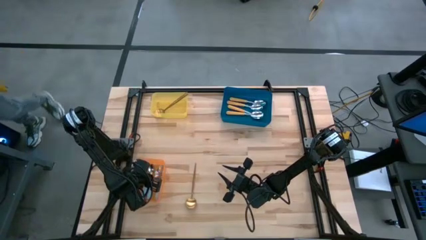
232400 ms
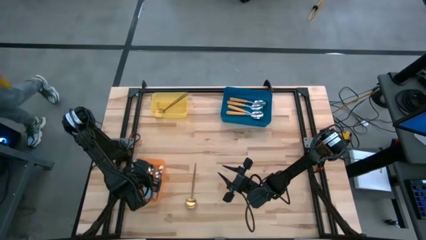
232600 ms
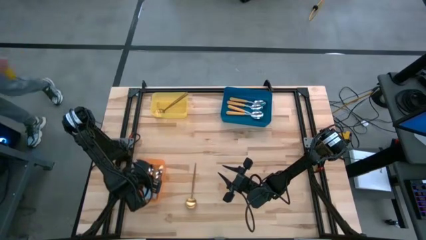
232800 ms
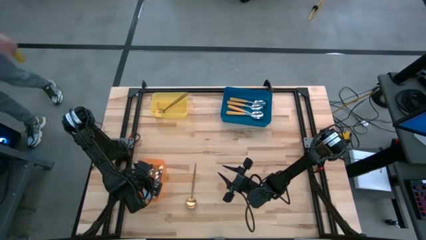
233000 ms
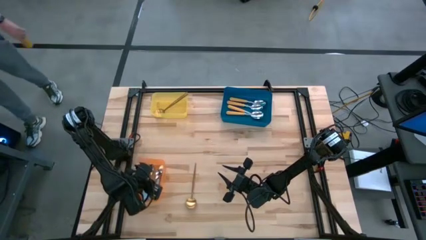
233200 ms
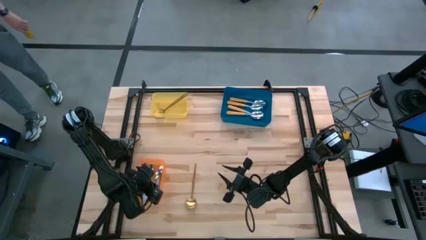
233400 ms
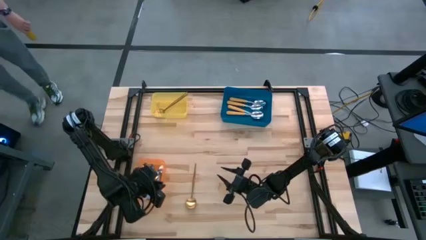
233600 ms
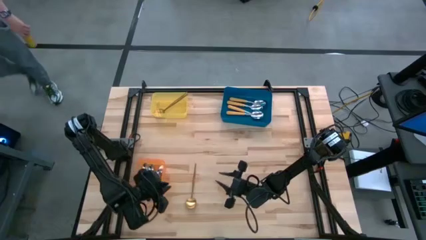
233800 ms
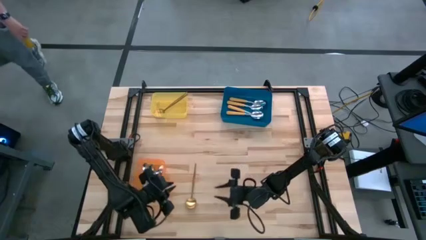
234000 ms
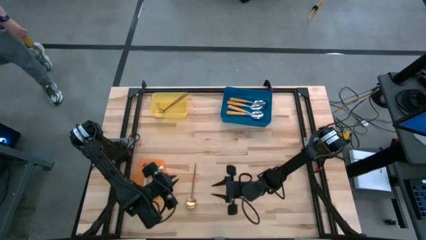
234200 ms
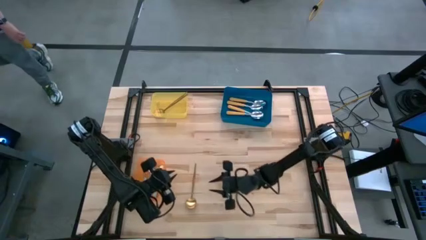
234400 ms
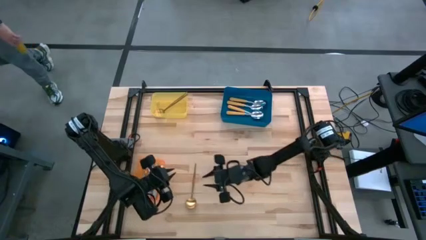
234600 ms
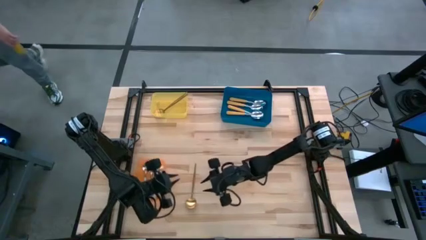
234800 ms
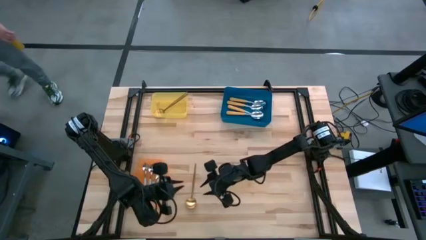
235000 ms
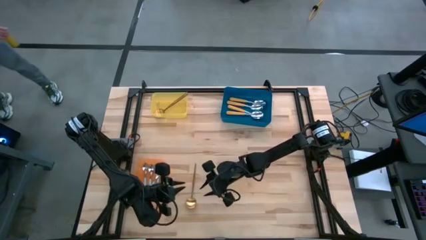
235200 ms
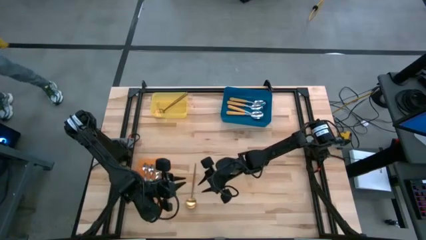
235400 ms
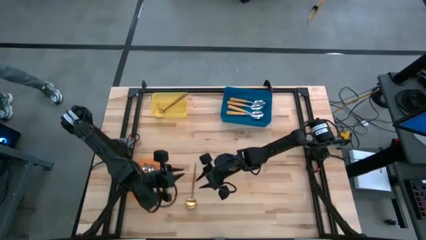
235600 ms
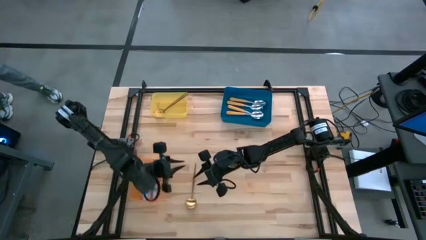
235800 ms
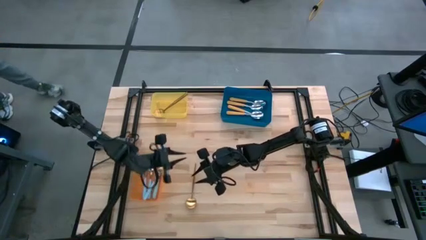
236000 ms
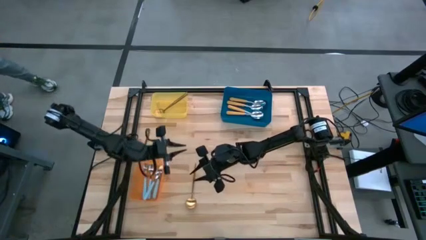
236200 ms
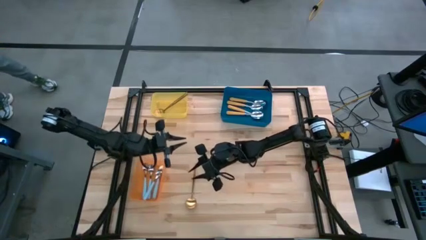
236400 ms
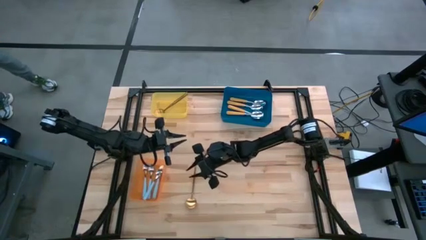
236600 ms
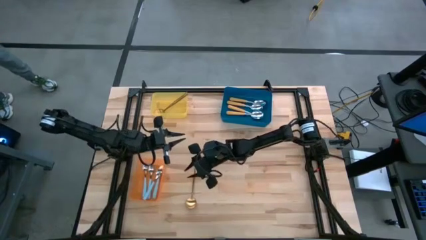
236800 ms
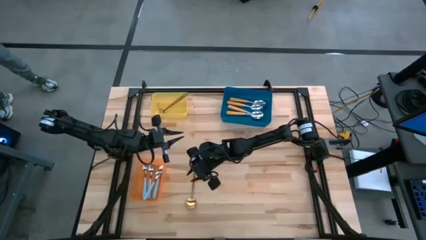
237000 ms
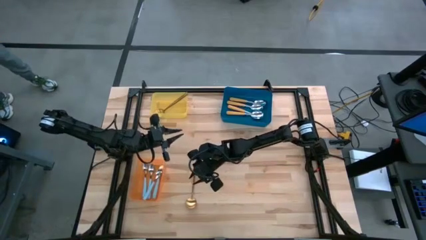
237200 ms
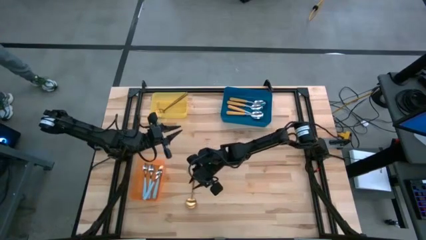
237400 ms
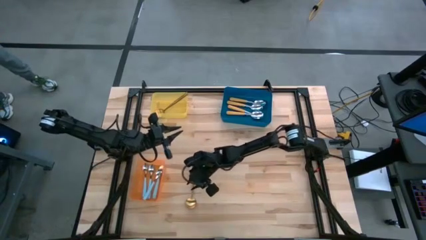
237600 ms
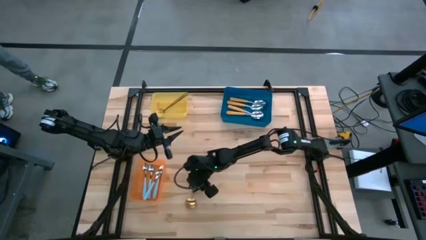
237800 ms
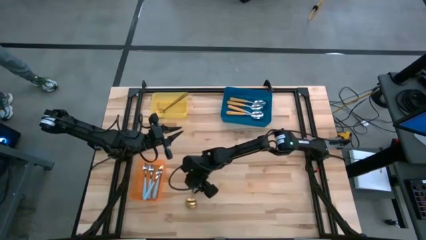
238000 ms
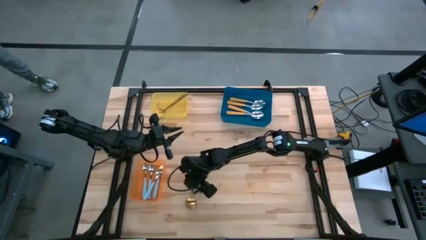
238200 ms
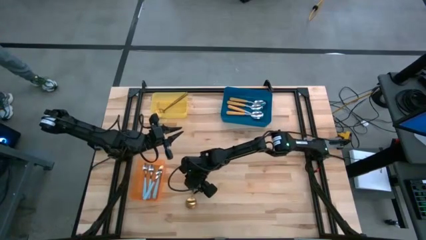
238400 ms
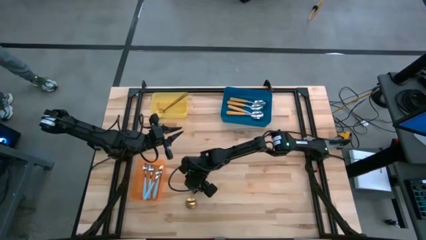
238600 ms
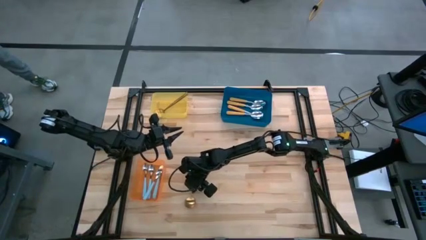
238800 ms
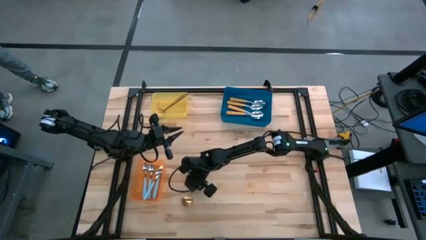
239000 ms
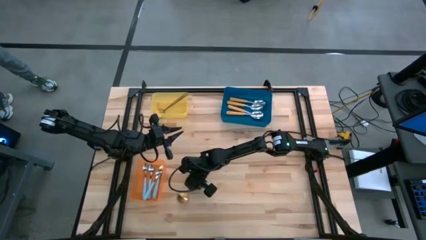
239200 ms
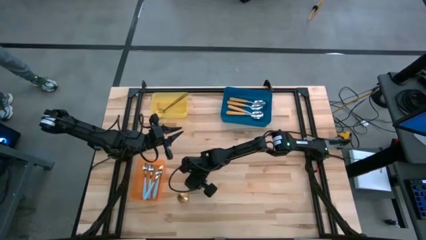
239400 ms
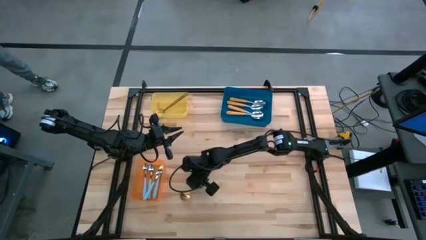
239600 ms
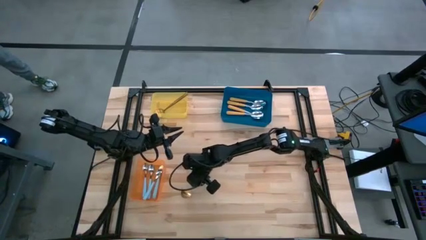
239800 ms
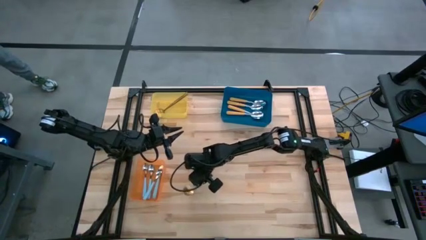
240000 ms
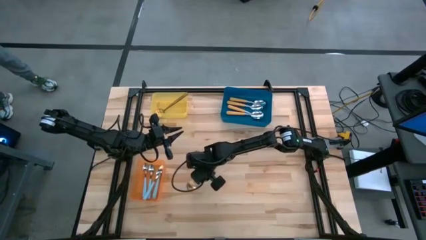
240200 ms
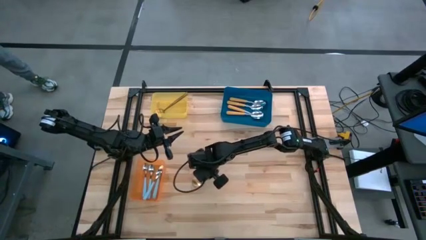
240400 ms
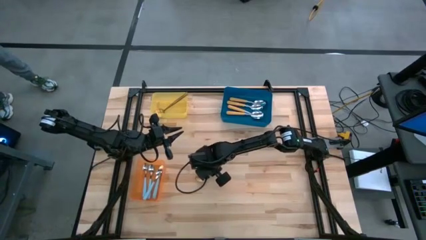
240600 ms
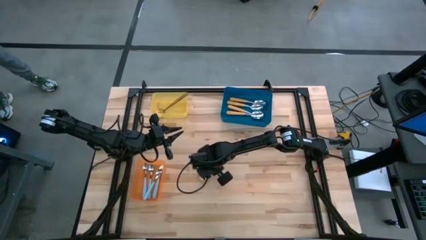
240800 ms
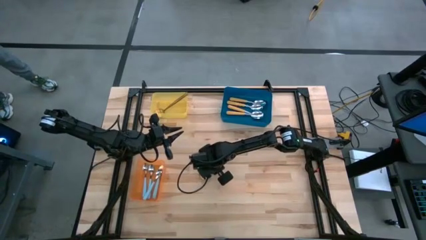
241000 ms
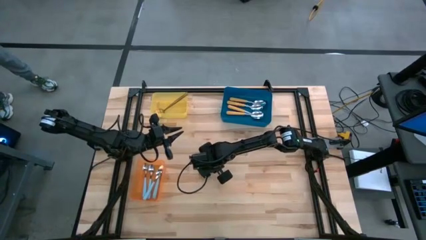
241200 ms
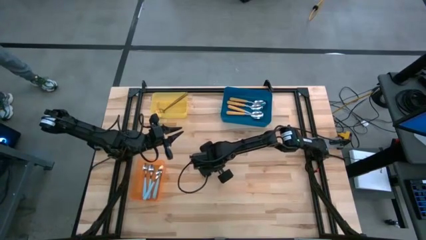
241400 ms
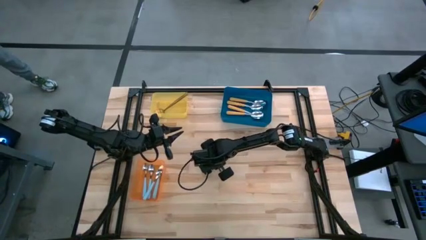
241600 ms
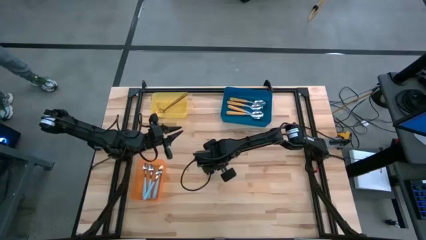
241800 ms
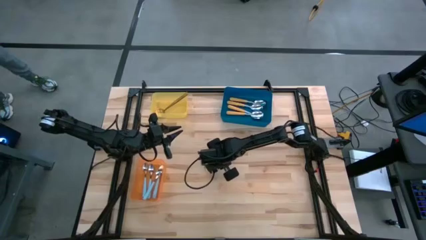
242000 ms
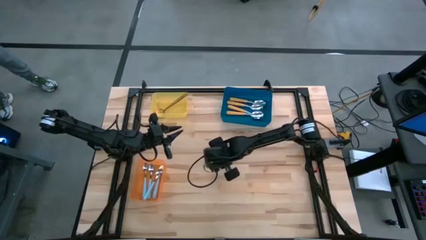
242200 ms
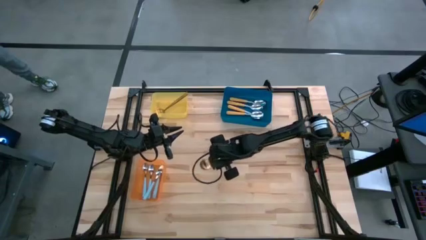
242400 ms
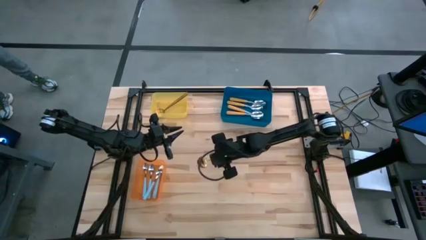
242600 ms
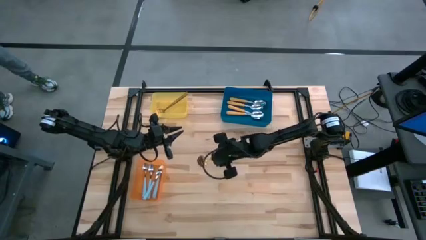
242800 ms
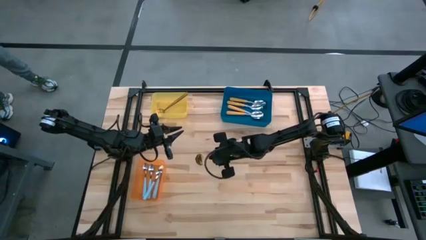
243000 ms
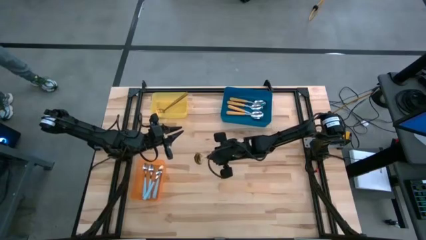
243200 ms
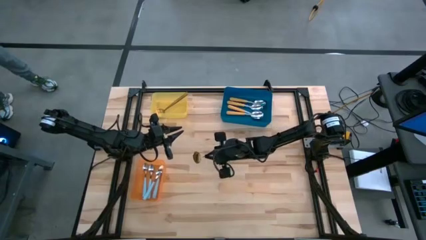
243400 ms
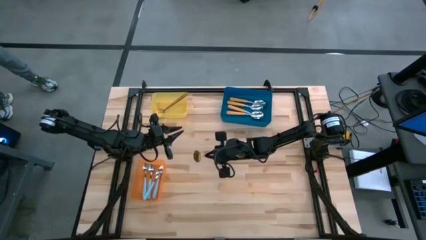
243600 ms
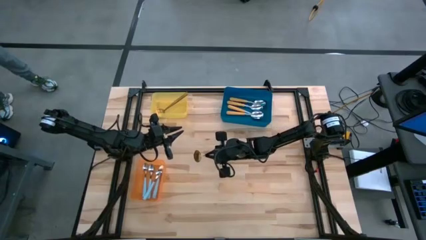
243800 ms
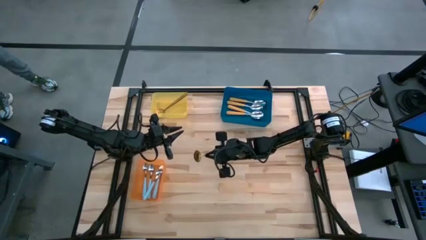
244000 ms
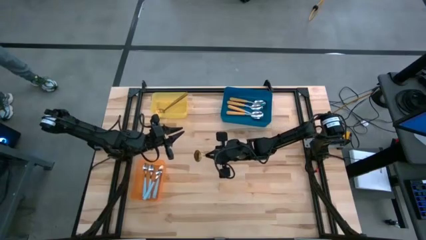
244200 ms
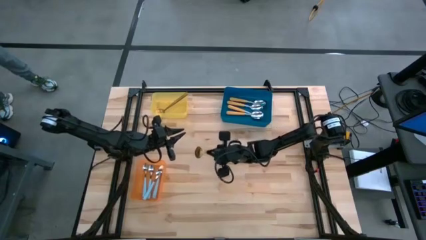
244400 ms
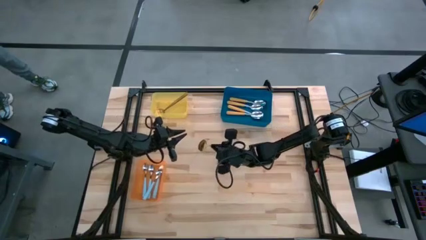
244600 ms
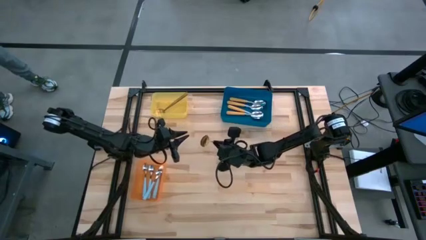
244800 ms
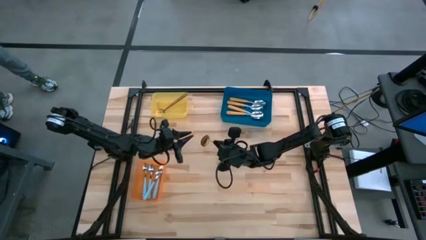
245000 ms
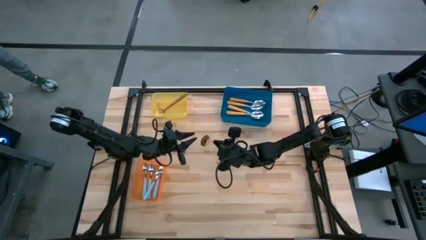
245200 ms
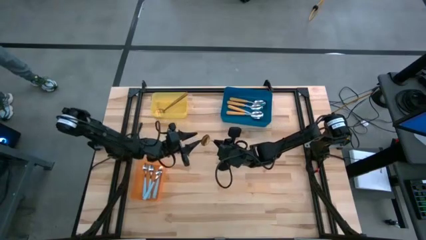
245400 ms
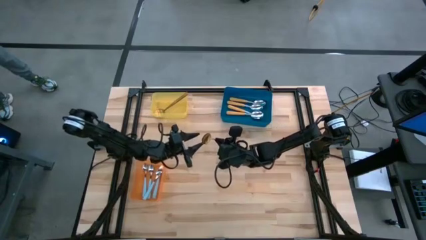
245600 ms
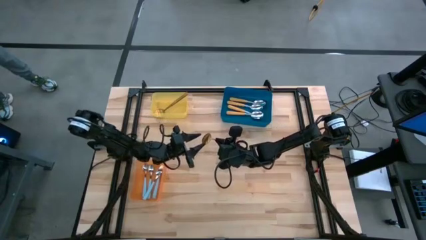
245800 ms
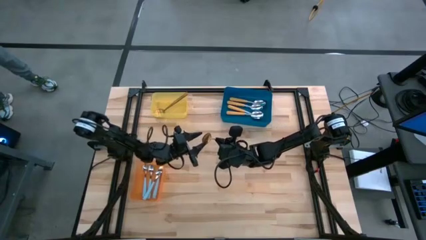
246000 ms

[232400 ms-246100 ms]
Task: Sort silverware by color (type)
Put the gold spoon into the yellow bin

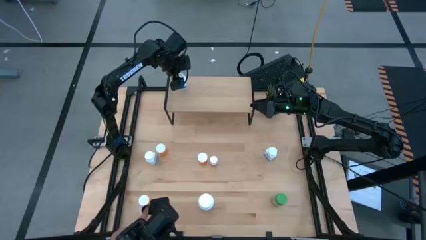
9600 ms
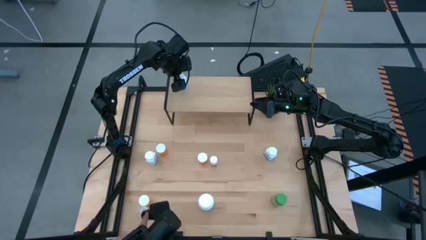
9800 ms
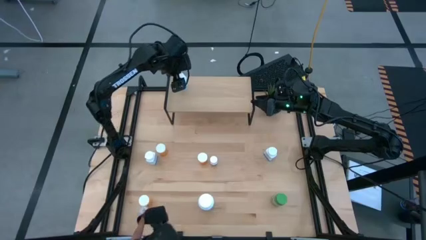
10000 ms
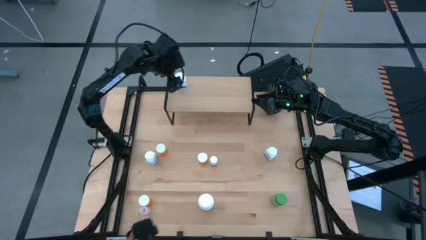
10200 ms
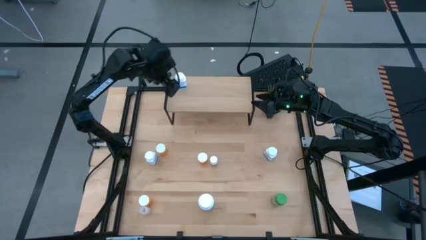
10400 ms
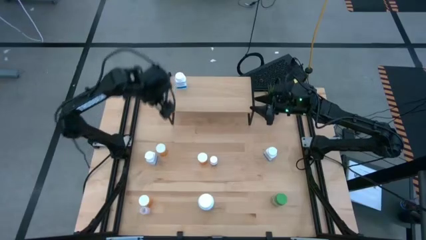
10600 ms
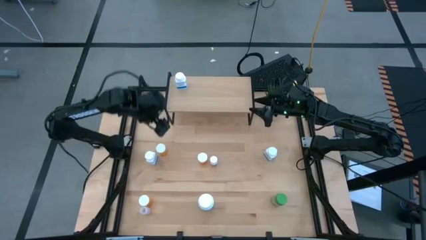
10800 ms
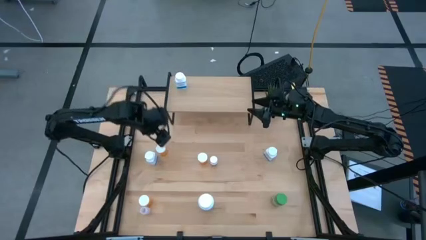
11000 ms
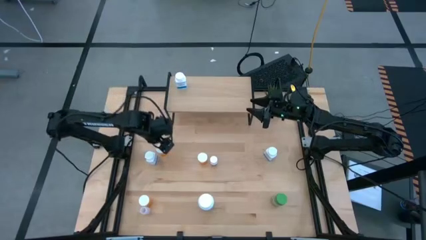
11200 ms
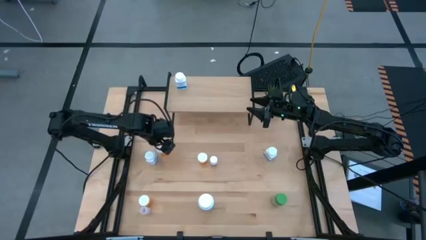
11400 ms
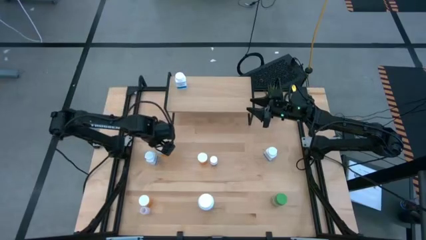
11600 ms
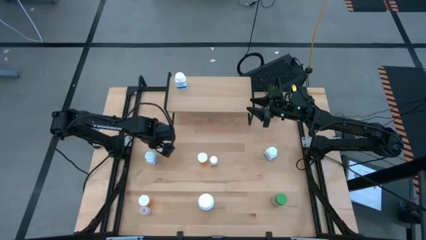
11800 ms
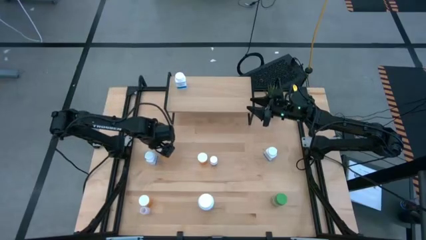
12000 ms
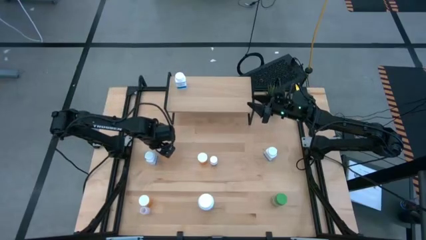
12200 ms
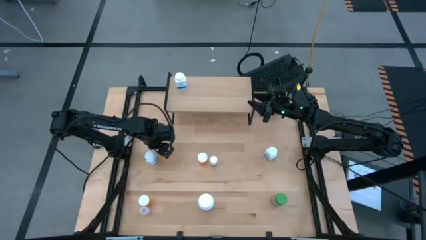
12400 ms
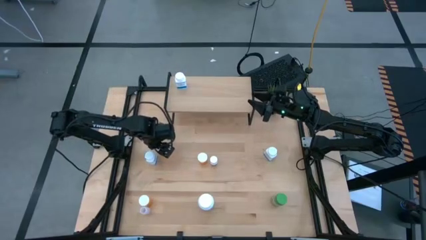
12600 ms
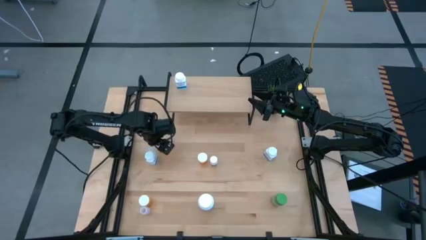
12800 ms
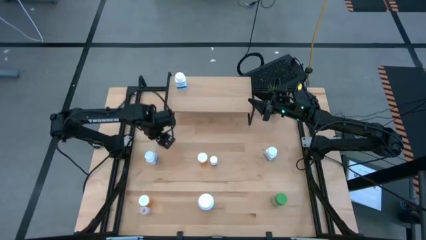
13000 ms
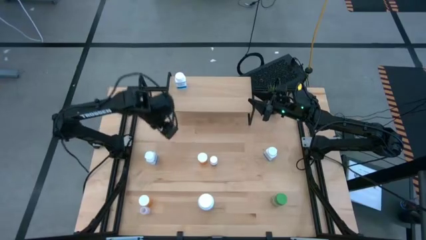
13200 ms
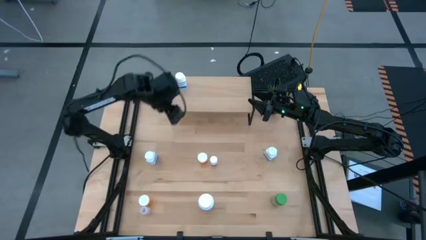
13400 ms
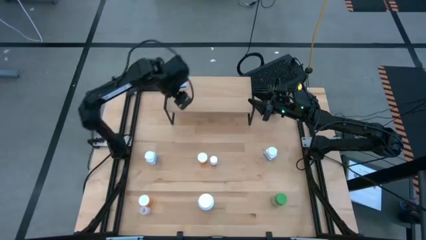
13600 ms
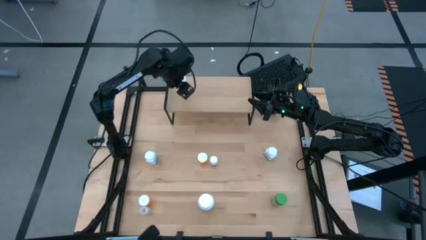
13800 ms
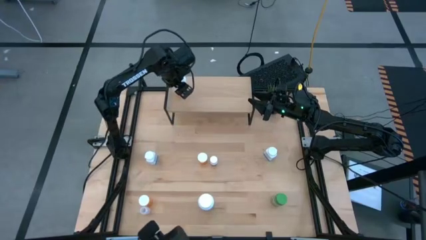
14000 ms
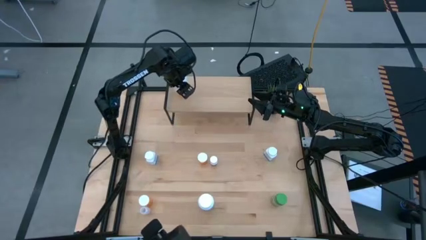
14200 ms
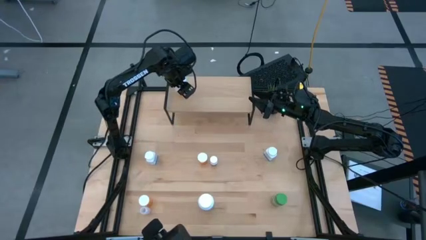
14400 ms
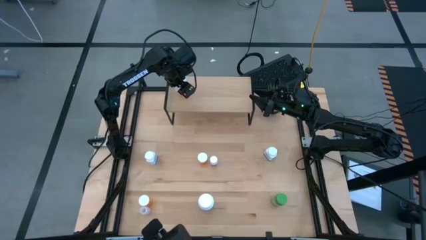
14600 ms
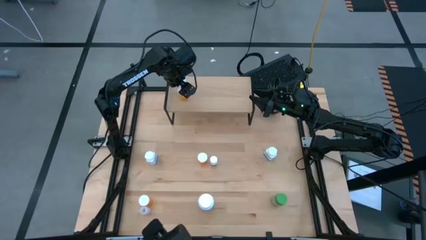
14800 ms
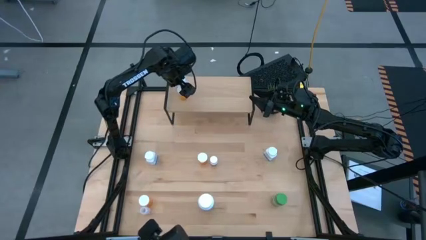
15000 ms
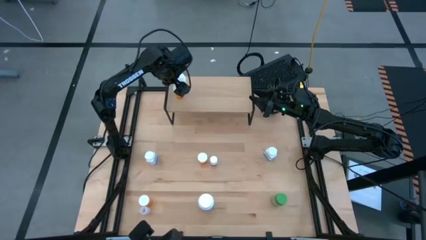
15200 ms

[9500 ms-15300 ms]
Task: Pick and place medicine bottles onto shelf by color
Put the top left orange pill bottle on the shelf
